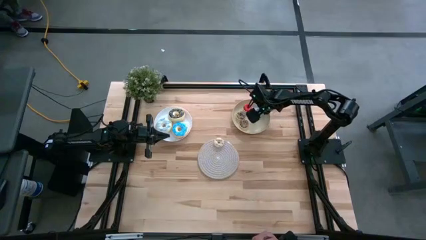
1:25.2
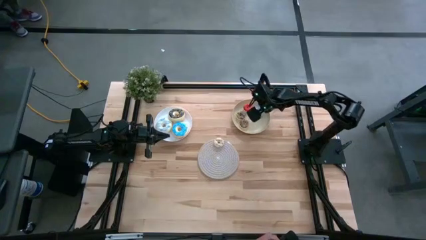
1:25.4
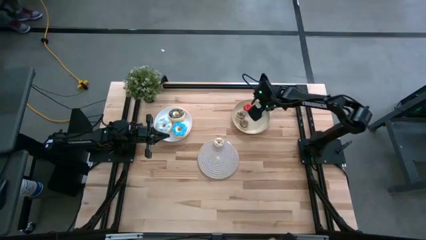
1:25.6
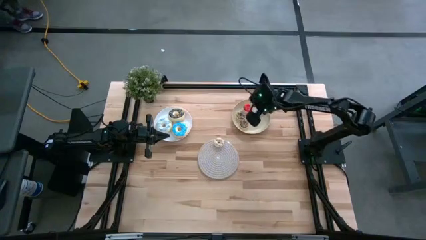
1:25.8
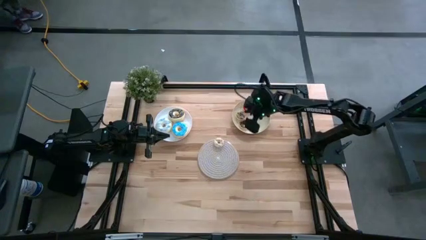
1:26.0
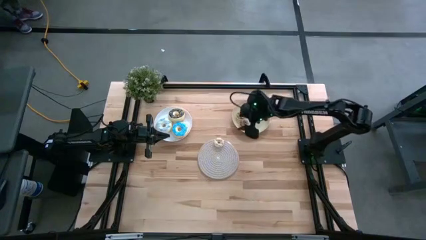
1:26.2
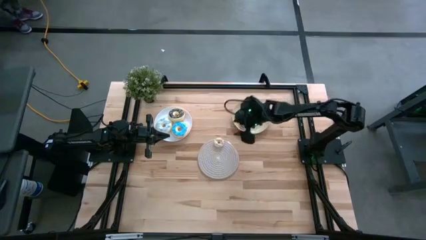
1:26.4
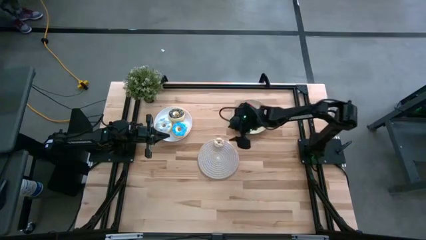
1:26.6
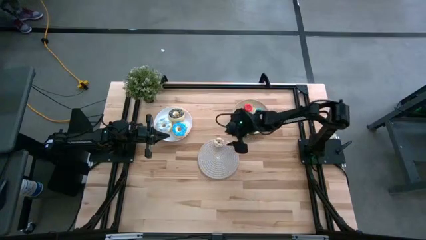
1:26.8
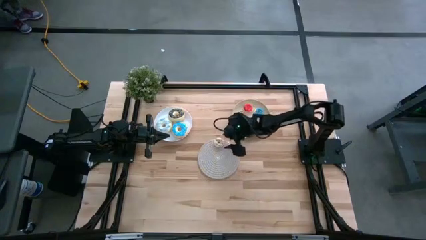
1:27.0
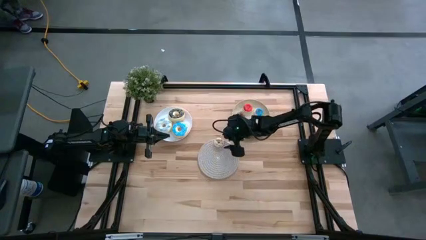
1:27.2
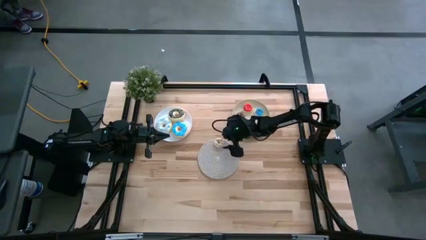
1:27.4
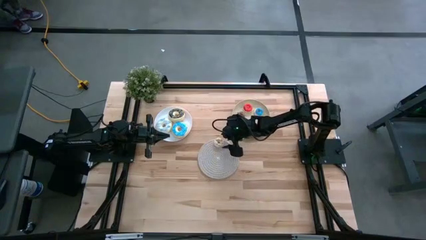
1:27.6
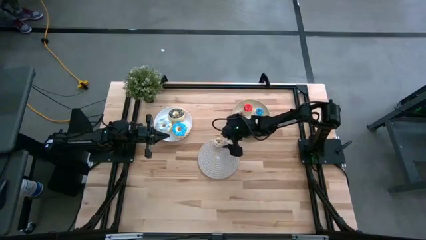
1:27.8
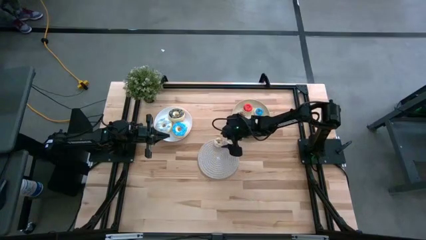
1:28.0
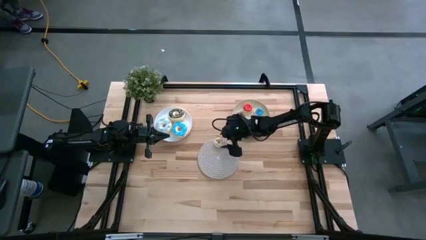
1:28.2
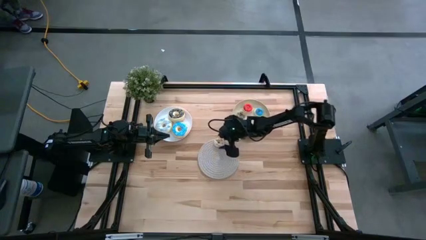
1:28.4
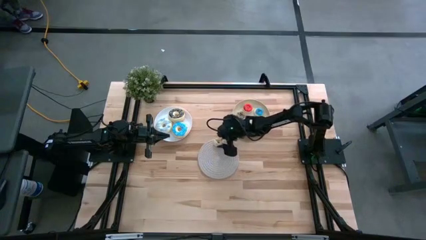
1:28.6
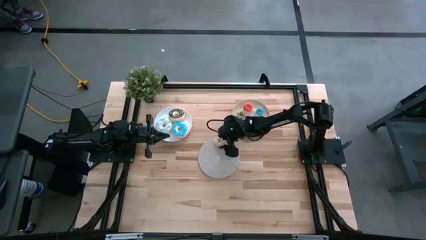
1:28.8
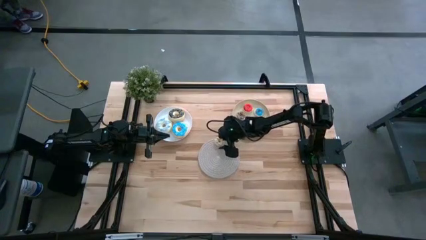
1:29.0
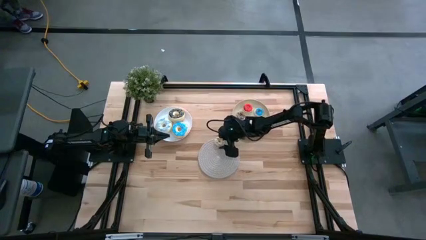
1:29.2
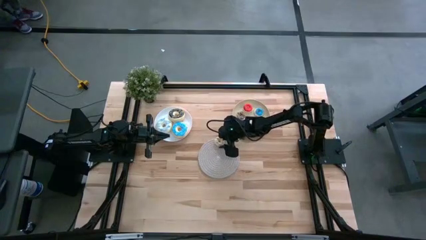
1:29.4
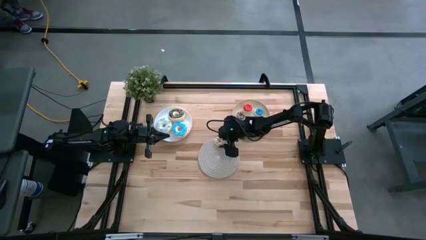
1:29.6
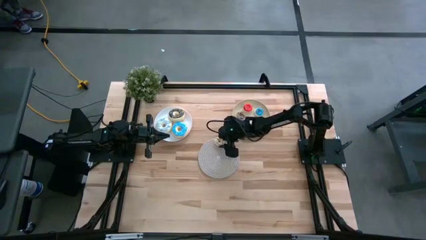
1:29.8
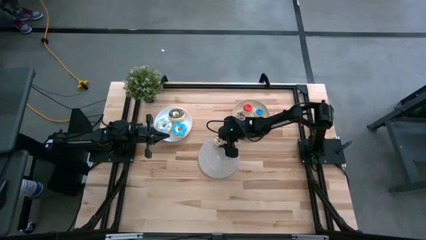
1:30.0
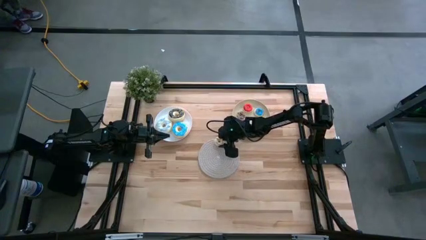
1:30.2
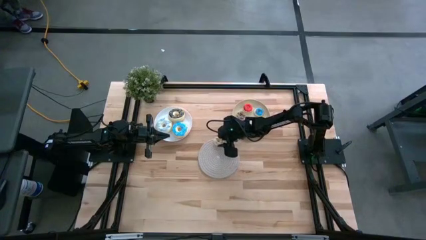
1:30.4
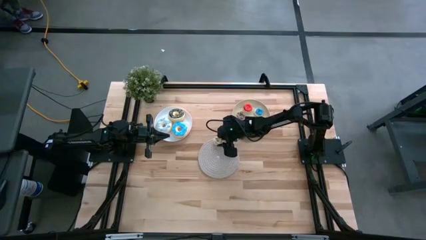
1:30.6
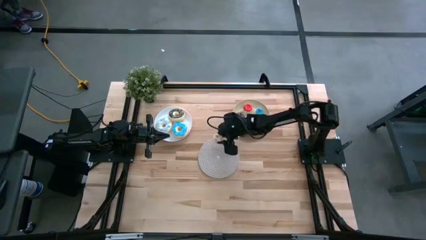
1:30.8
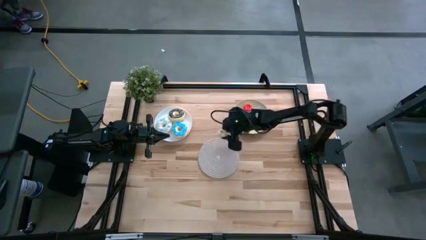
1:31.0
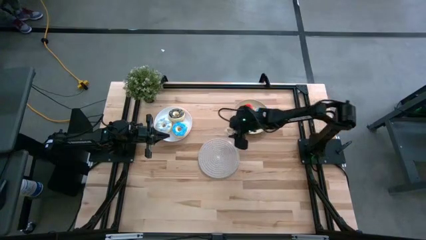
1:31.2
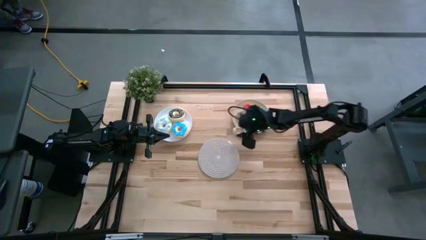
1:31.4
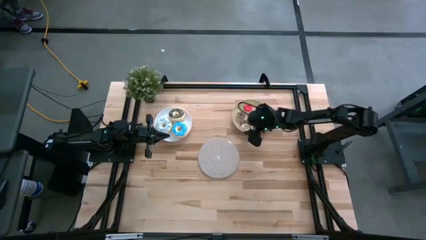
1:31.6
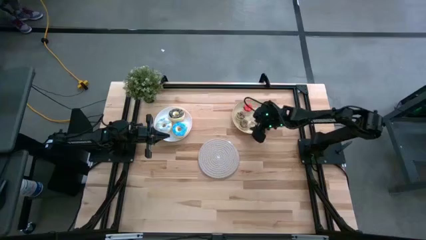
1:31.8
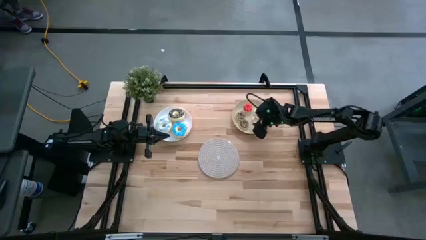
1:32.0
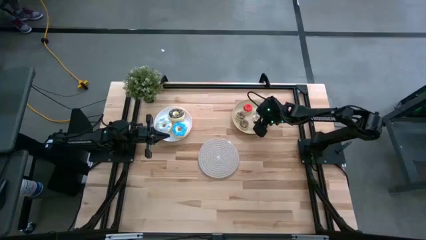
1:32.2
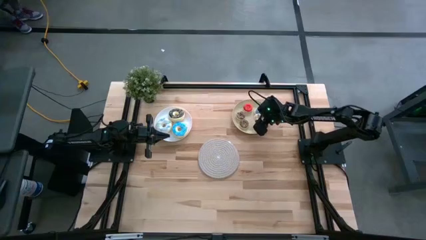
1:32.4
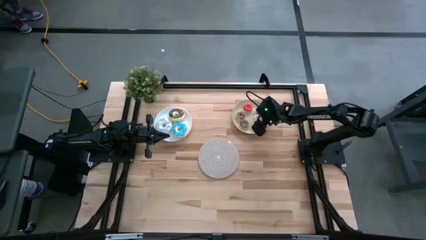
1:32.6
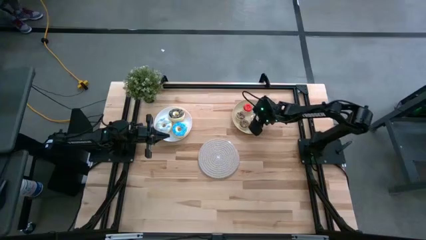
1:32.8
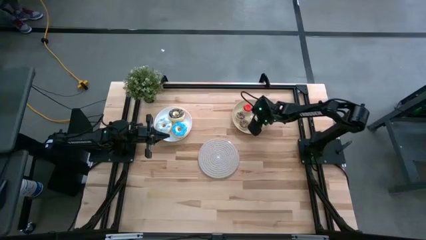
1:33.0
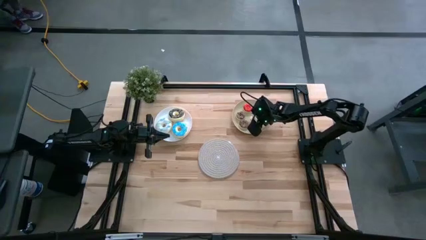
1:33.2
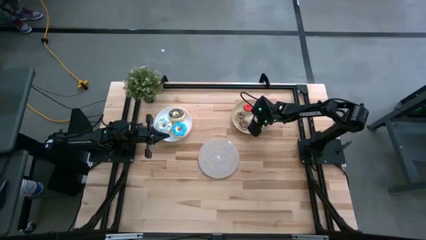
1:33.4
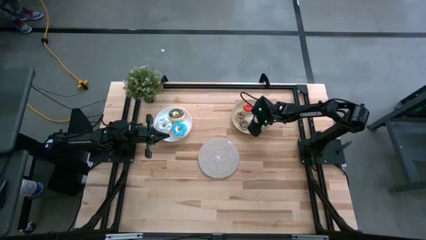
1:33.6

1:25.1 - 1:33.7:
Task: Pick & Place donuts
Put the small white donut on the brown plate

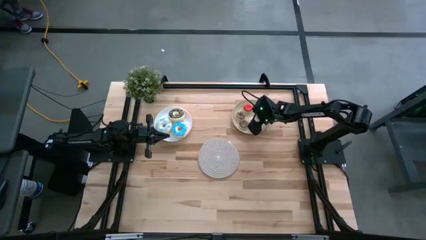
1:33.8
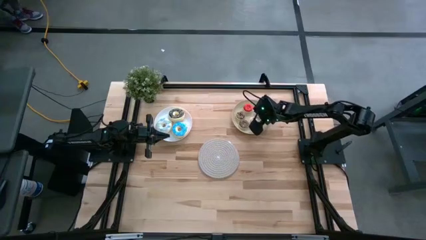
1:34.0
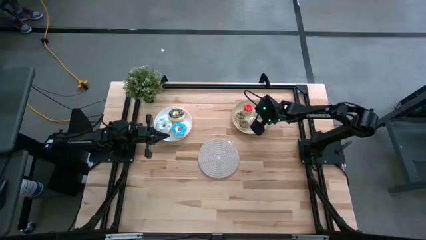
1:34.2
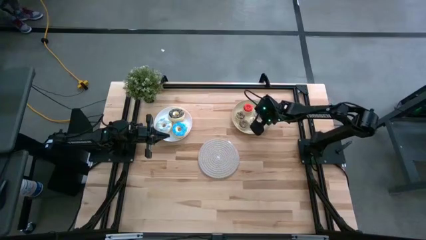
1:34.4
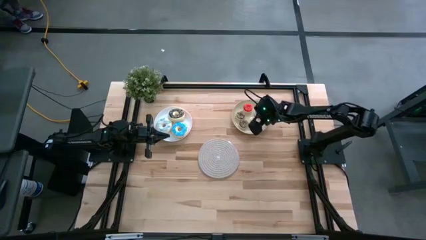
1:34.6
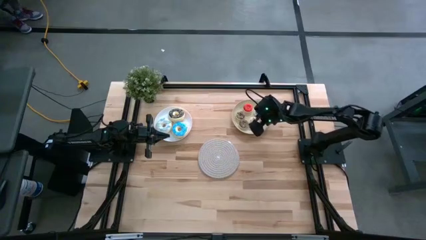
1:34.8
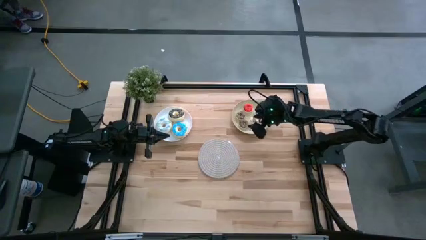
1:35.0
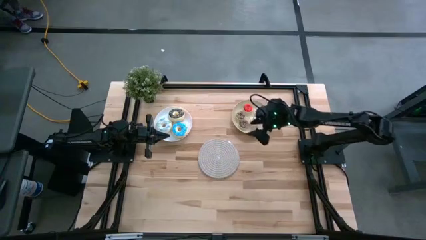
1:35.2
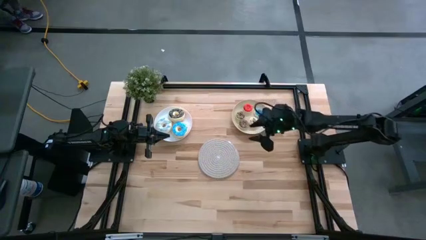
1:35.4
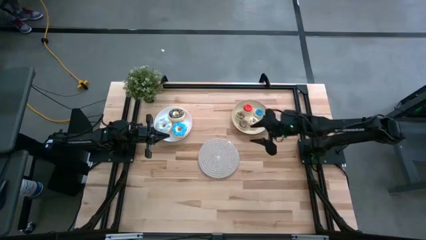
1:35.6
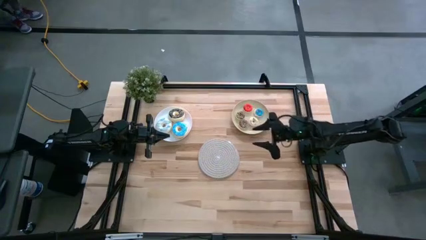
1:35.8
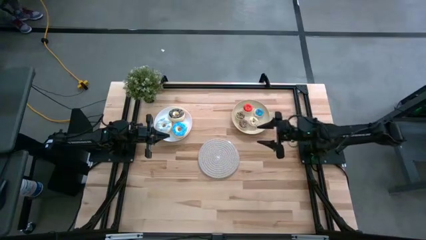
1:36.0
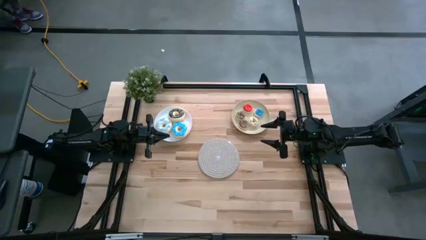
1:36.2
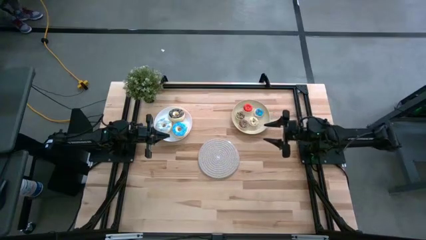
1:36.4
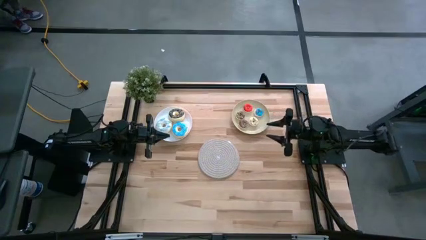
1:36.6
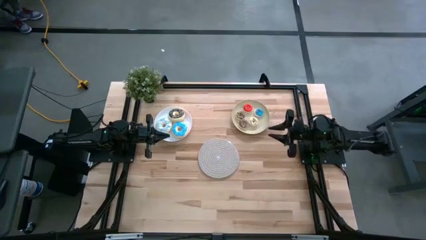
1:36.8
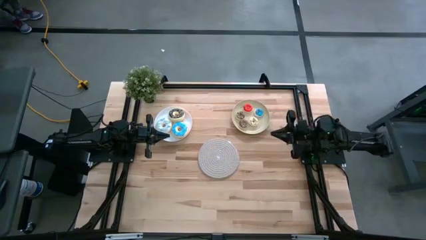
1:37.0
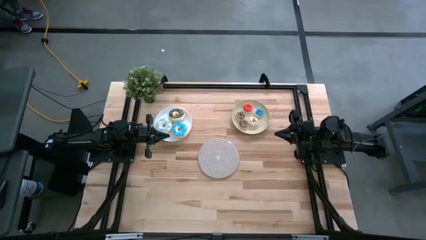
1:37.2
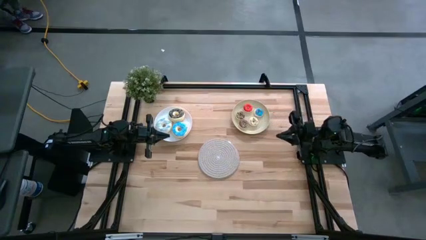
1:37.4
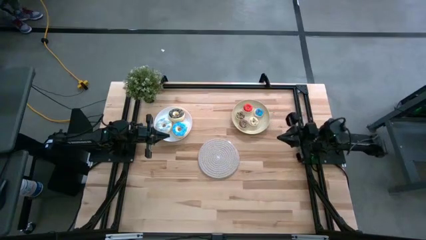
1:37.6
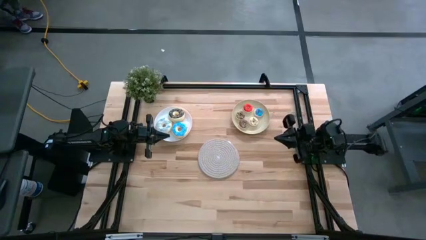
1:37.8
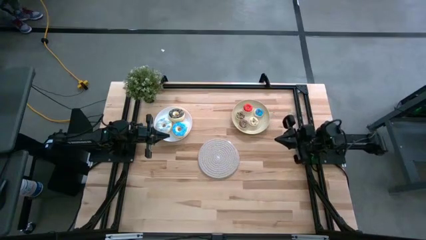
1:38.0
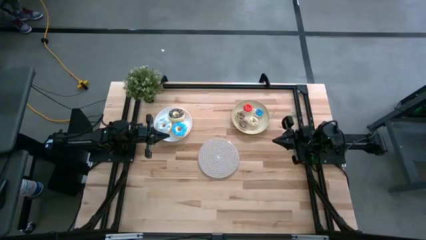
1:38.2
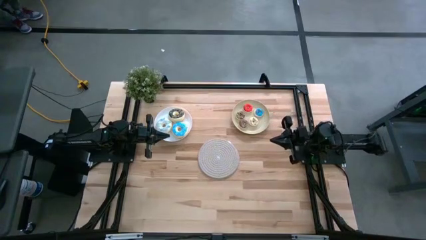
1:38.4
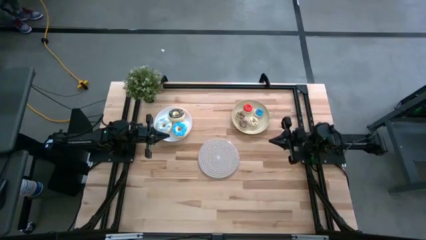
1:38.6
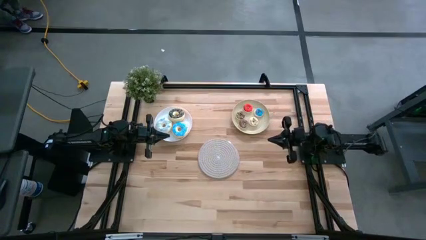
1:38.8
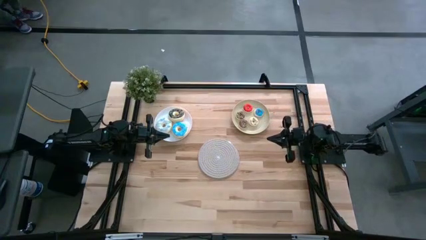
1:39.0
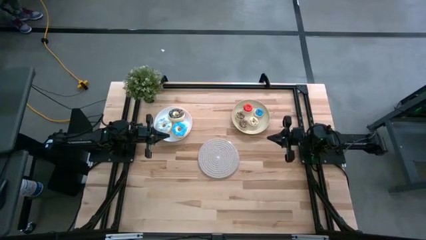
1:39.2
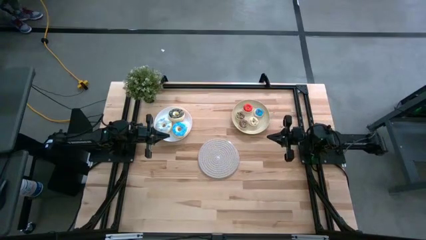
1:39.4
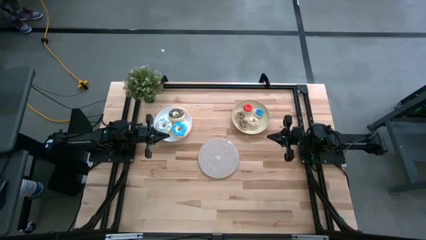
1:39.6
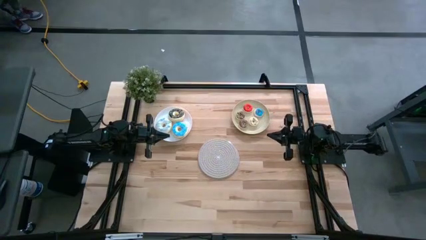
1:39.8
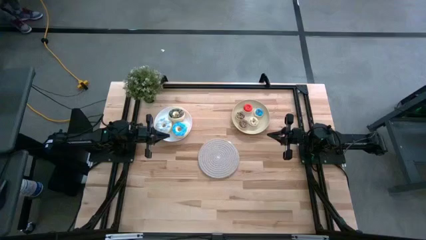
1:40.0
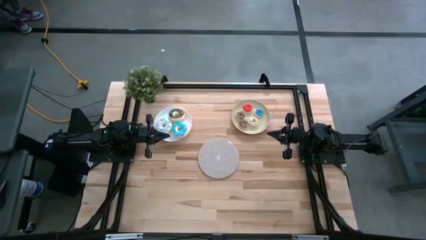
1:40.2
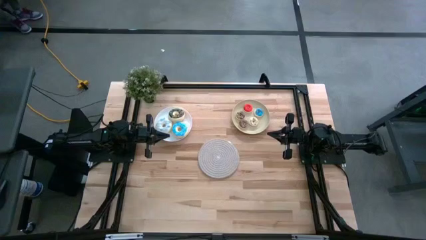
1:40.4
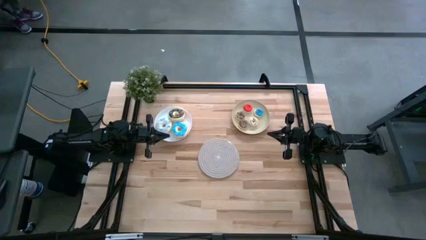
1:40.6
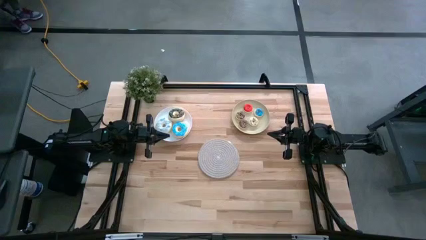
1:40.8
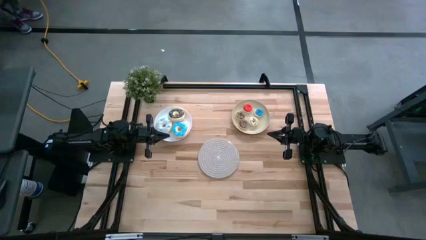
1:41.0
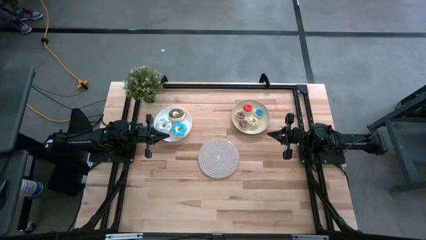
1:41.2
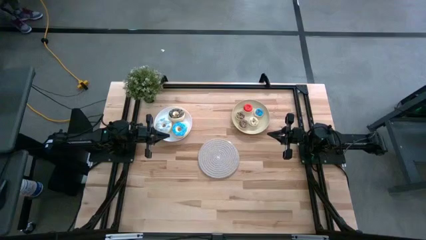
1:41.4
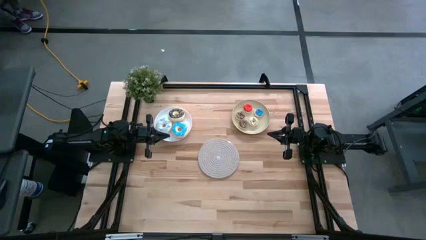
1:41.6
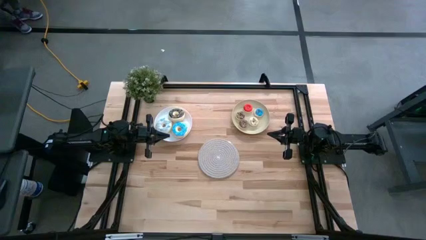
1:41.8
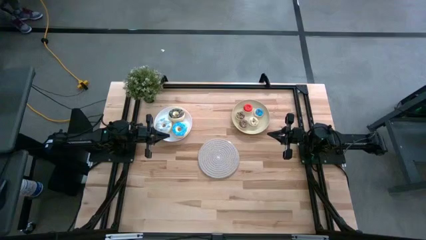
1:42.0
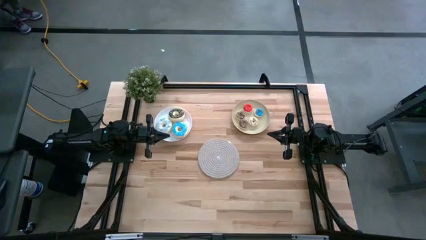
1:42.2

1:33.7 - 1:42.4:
Return to Home Position
